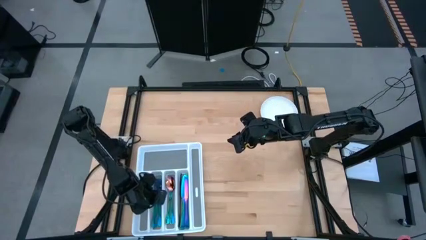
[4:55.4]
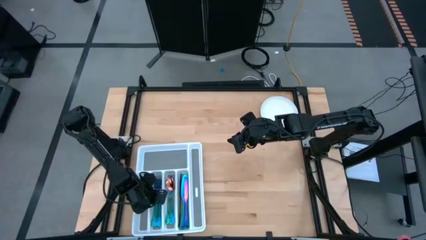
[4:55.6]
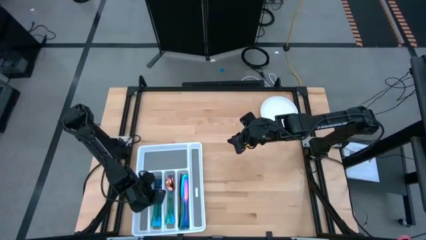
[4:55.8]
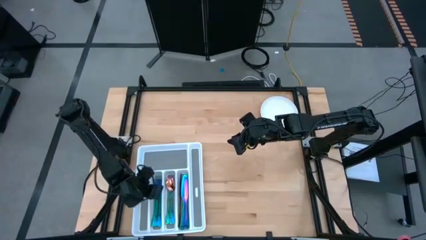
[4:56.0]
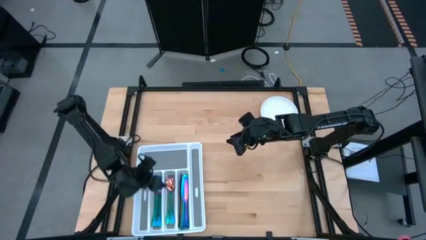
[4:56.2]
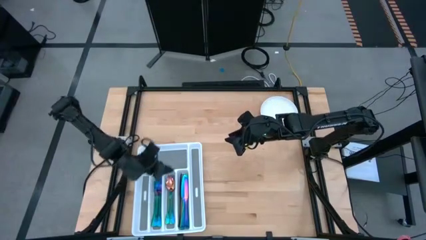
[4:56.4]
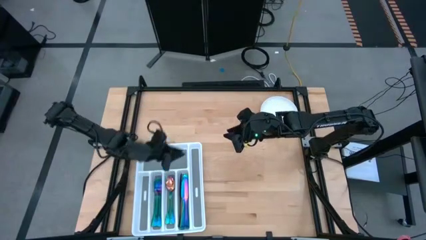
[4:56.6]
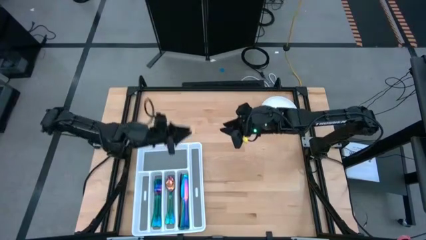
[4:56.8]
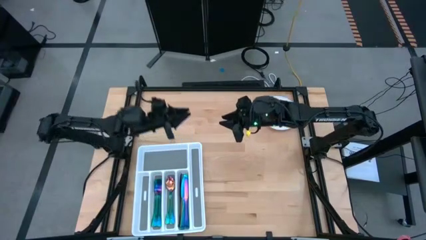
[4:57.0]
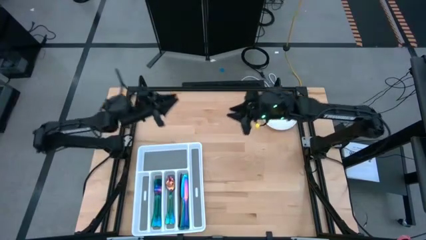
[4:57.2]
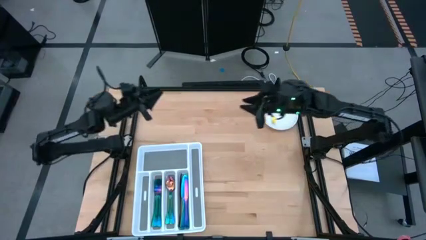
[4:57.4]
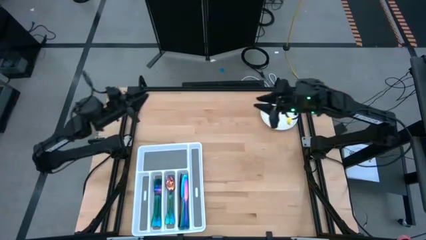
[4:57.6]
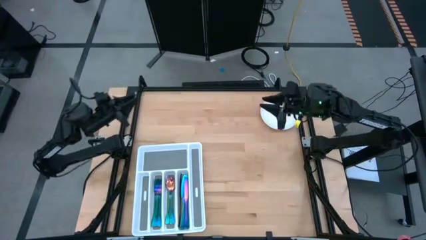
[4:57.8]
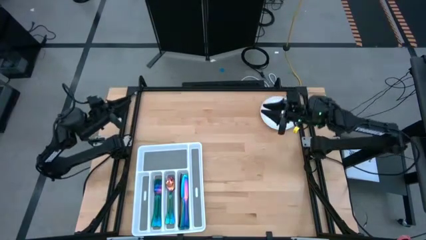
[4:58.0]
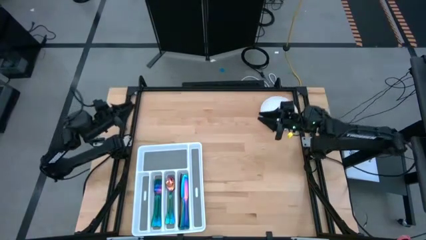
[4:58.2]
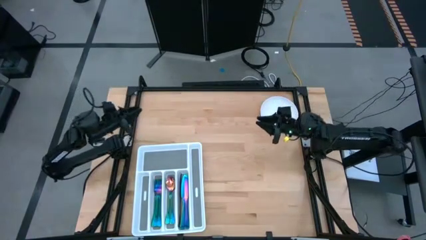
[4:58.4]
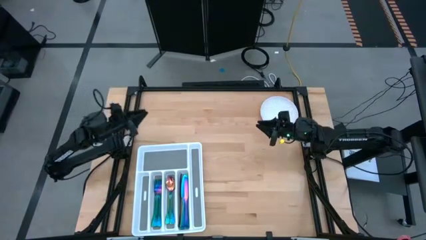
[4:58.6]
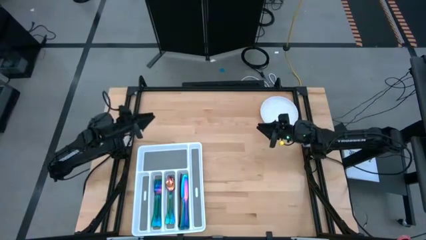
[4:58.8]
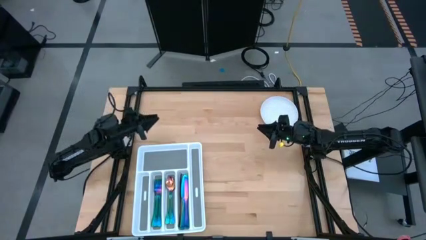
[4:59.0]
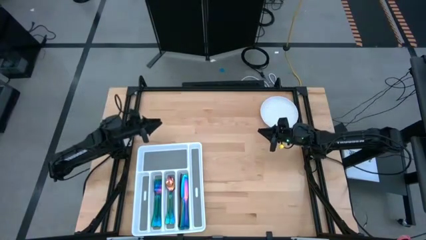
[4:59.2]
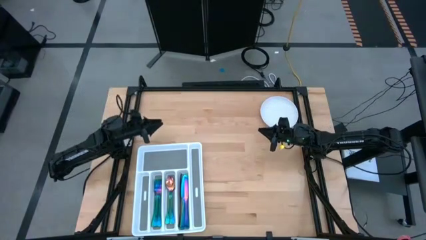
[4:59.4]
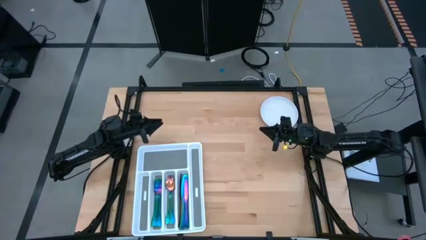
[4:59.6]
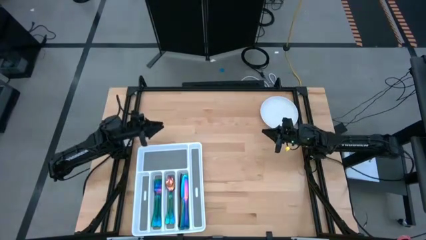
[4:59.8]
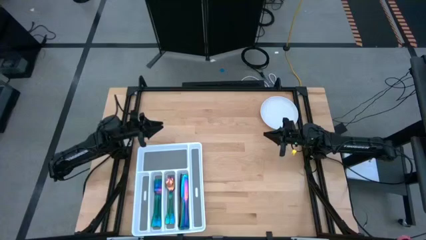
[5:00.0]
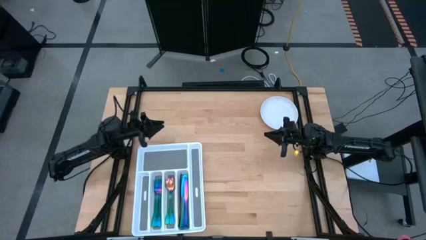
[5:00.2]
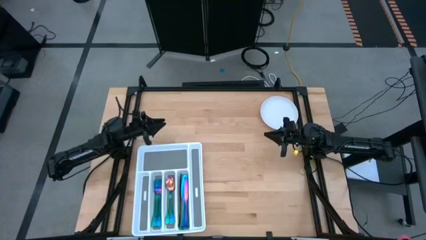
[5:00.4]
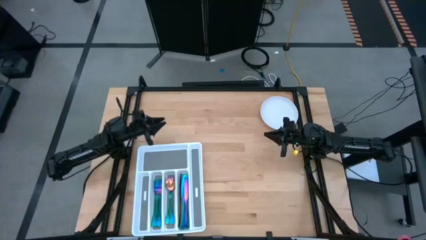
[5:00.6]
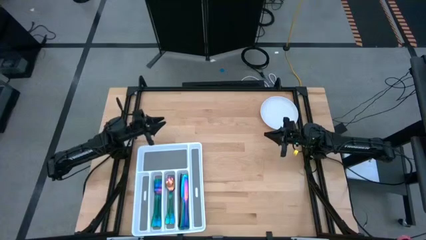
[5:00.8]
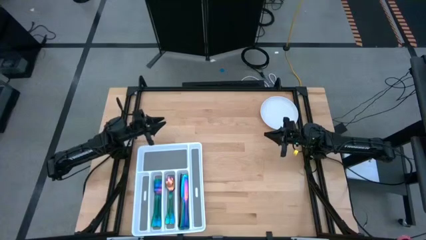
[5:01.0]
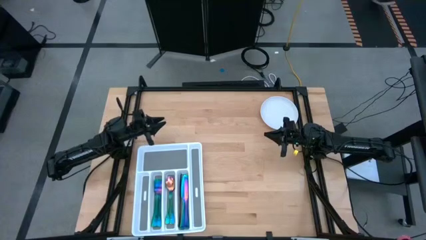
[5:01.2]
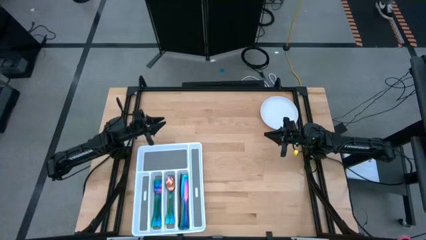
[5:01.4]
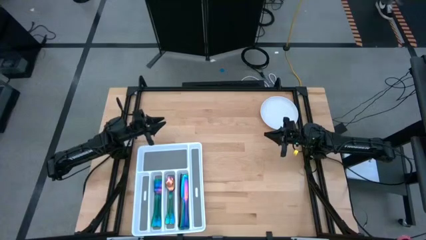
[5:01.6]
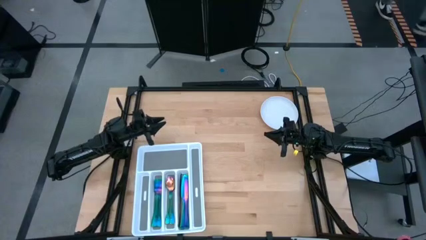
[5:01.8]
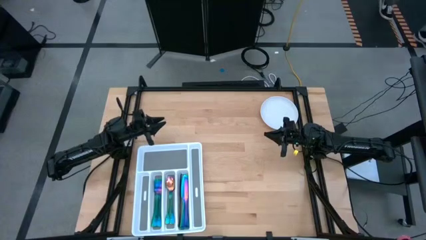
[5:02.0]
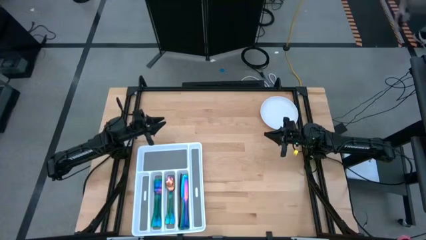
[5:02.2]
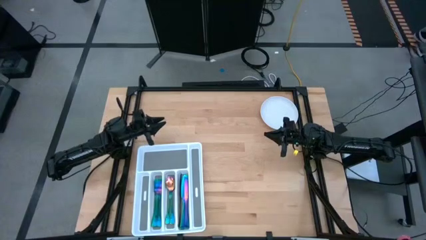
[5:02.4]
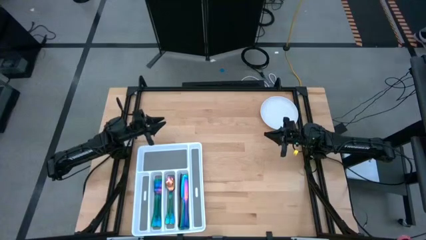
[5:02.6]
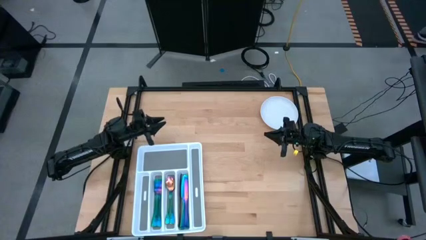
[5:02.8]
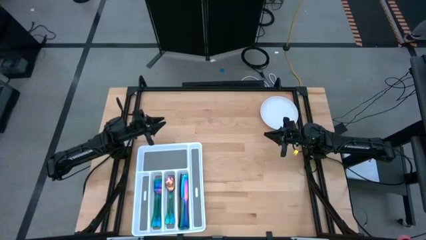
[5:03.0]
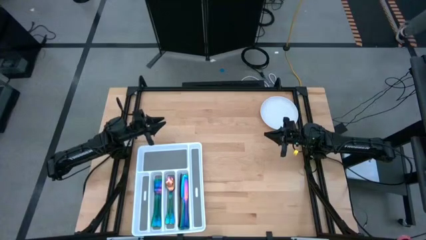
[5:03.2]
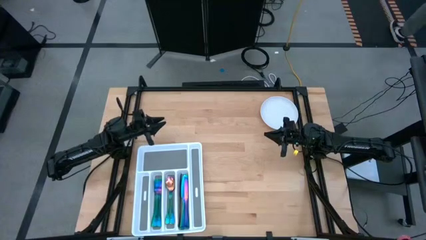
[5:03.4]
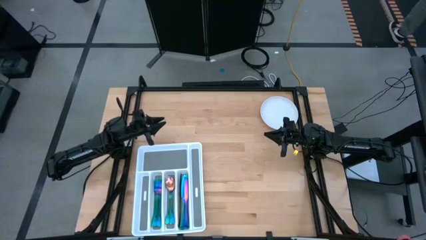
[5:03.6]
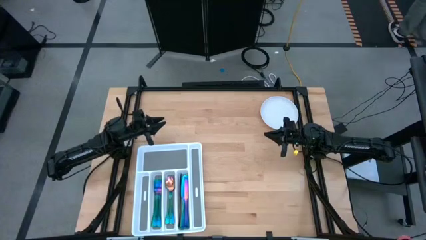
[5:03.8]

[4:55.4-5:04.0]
Task: Sort silverware
Return to Home Position

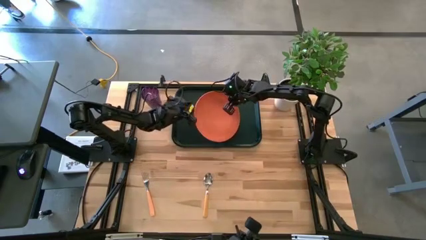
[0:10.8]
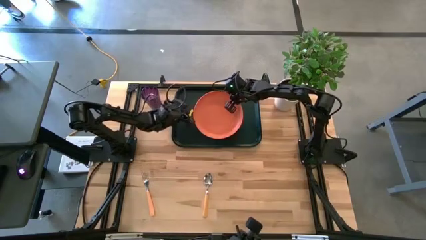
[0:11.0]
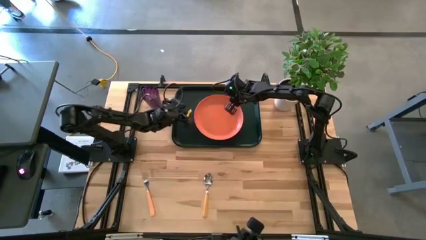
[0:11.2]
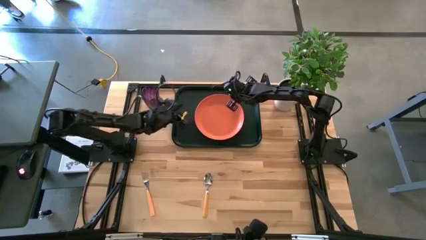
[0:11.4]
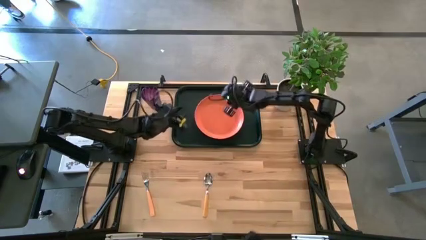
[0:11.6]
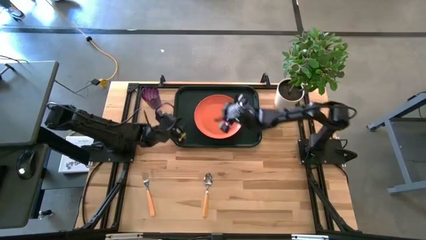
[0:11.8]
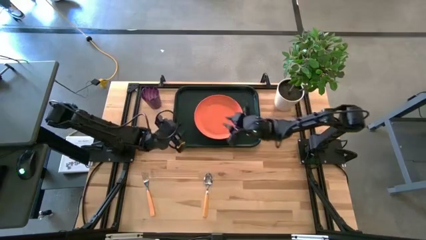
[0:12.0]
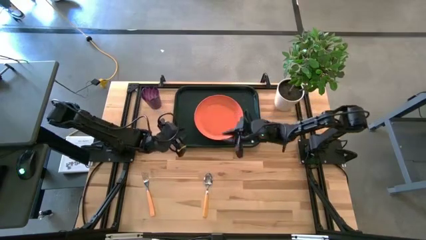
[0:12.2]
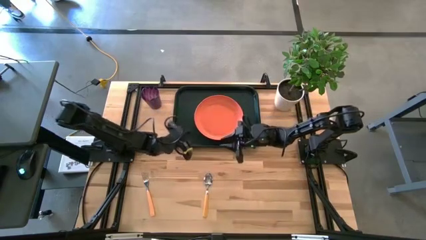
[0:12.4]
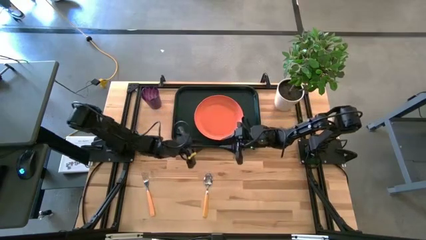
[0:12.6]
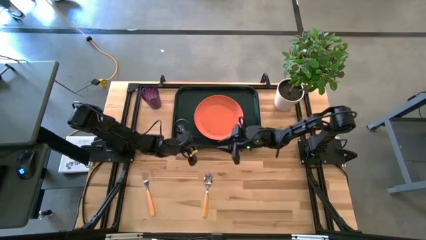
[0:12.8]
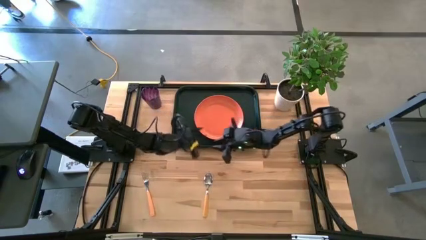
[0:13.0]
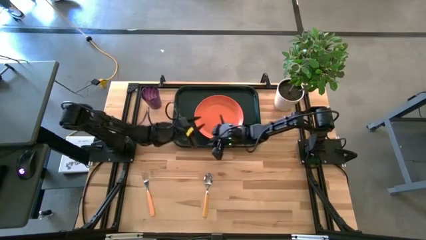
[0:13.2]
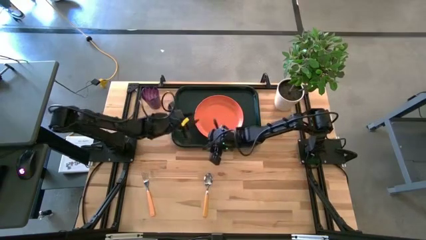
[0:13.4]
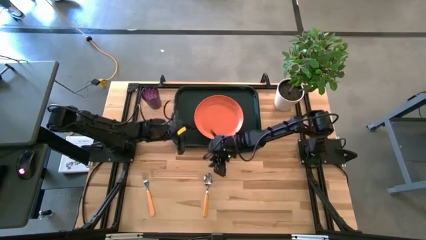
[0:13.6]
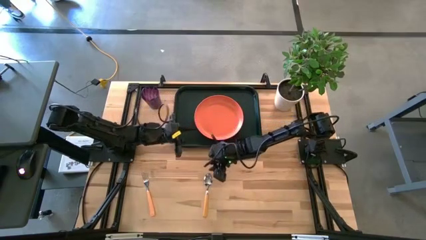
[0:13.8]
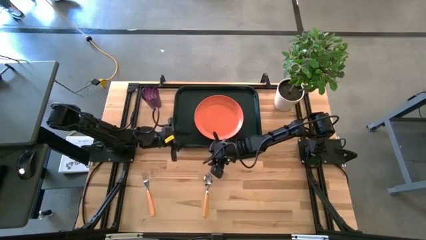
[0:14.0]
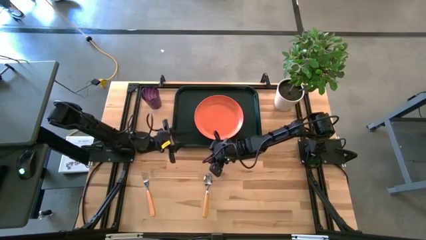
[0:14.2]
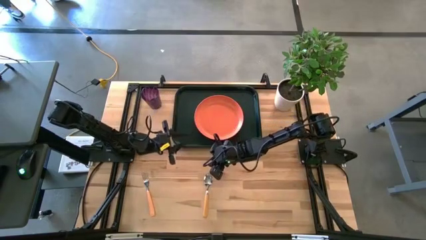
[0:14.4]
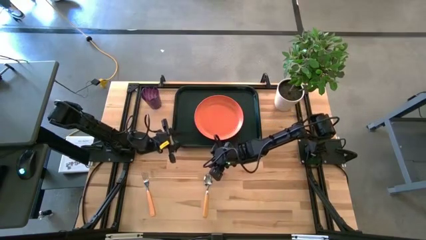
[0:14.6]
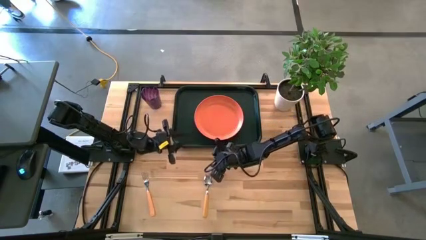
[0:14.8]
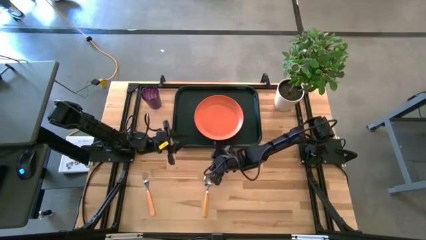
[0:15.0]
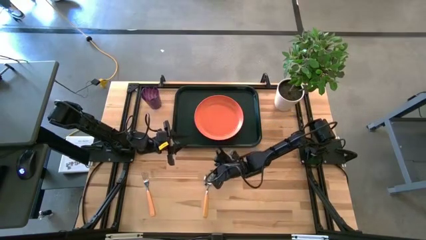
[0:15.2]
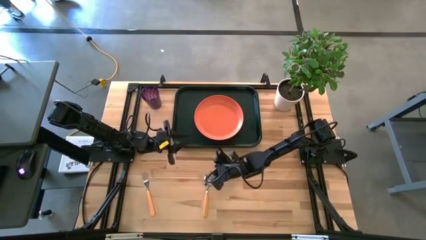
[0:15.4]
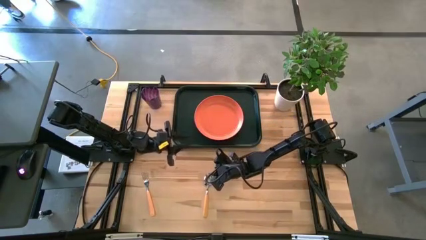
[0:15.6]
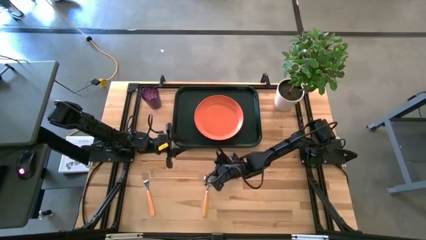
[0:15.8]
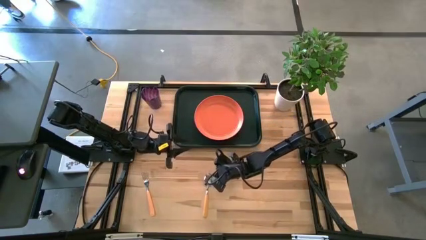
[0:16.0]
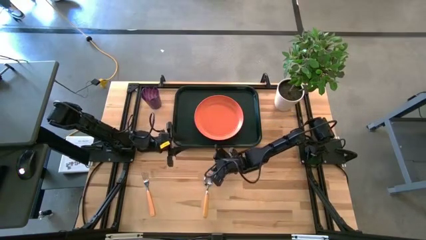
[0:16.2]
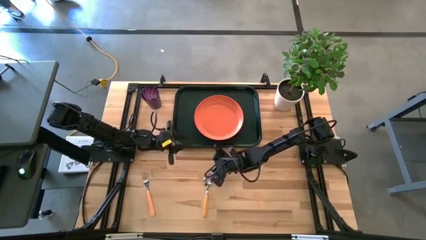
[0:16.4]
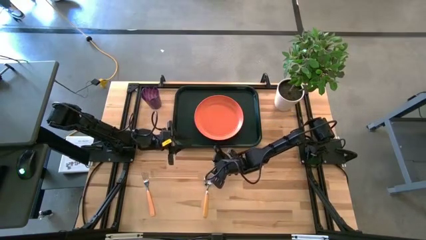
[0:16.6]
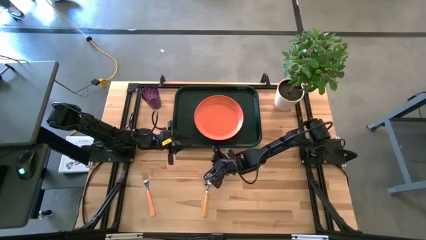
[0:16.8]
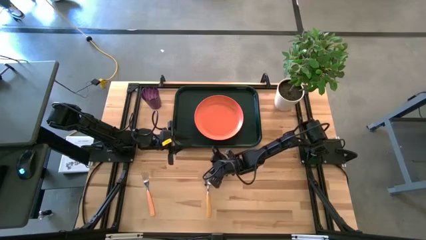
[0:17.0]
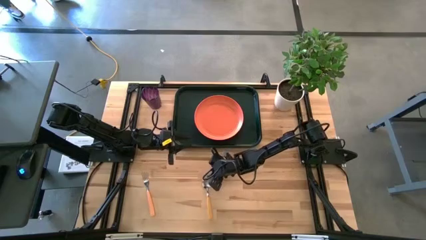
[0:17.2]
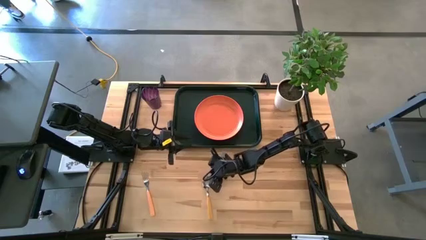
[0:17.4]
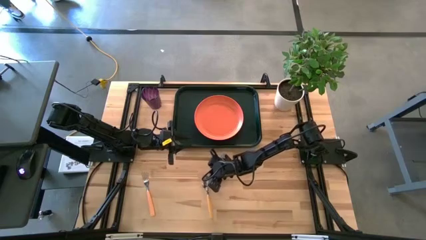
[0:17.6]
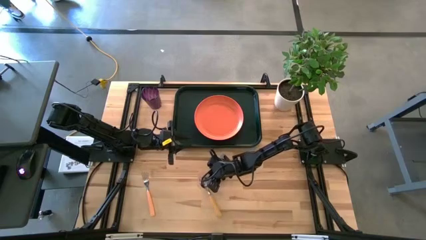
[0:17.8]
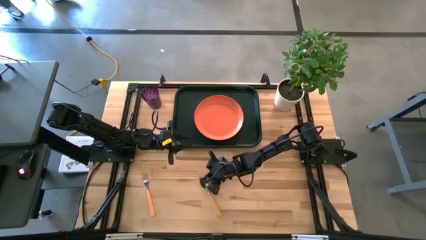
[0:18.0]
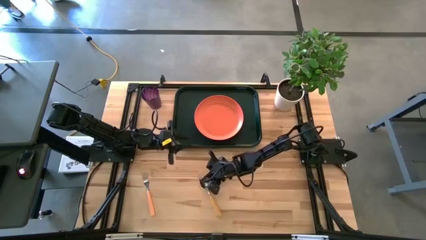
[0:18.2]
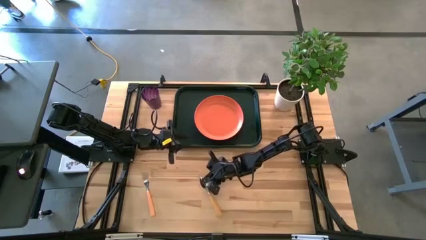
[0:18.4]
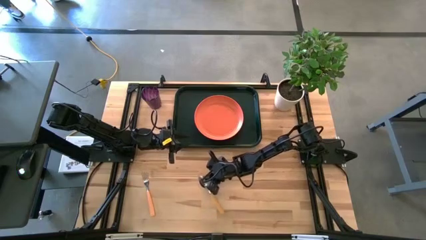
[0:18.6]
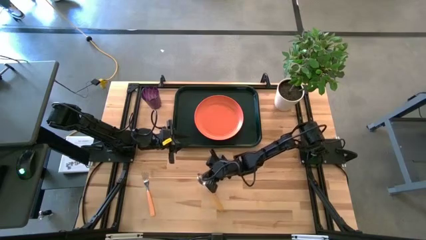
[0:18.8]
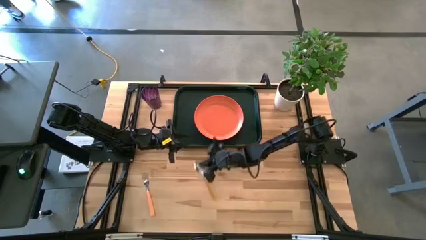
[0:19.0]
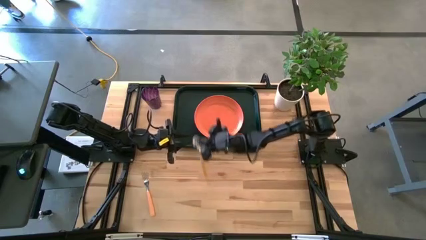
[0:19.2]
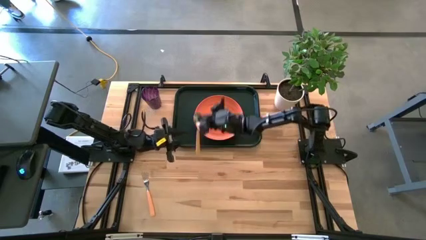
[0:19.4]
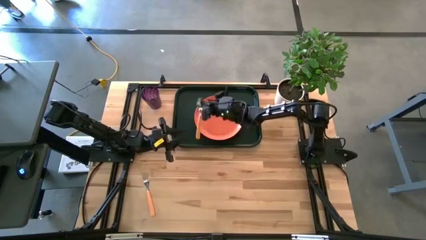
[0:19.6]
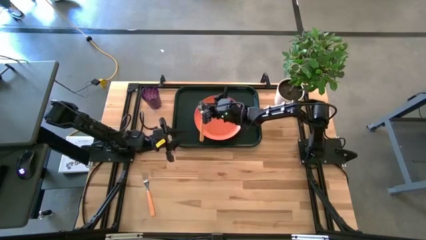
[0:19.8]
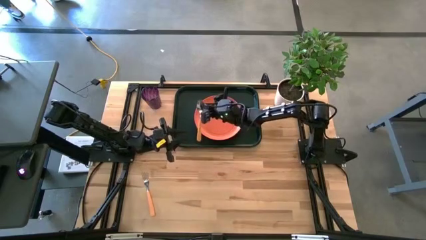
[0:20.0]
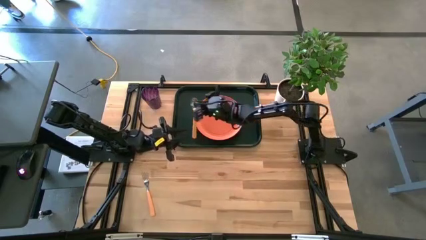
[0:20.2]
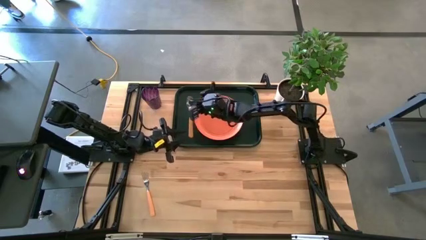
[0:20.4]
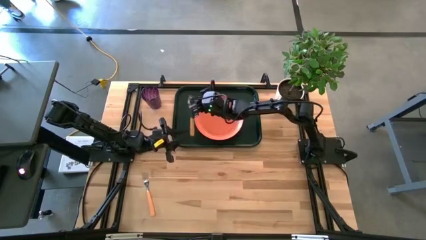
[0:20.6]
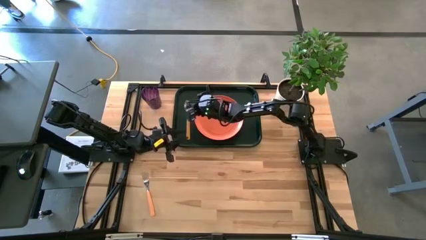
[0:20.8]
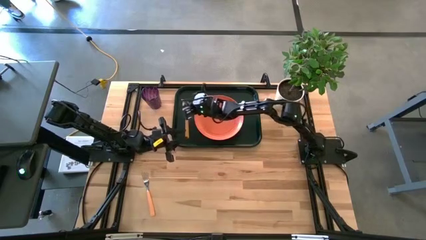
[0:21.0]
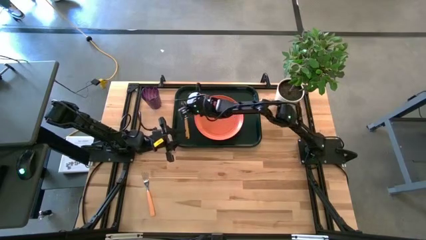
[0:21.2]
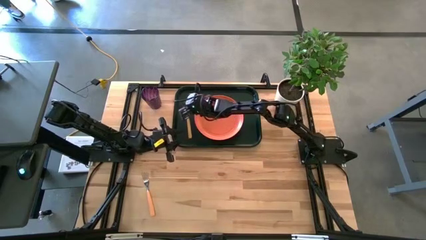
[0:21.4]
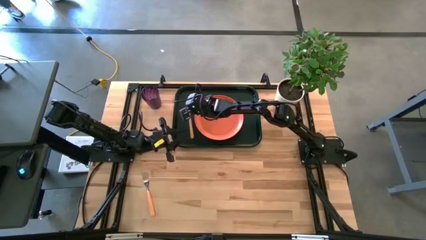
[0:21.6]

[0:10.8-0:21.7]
Task: Pick and place plate/cup/fork/spoon on tray
Put the orange spoon on the black serving tray to the left of the orange plate
